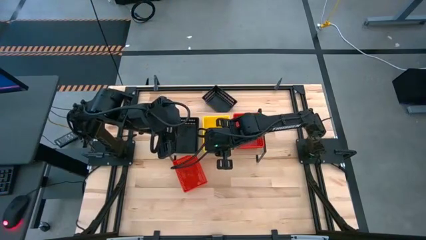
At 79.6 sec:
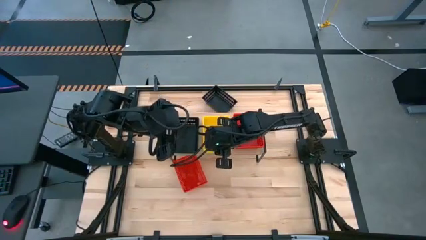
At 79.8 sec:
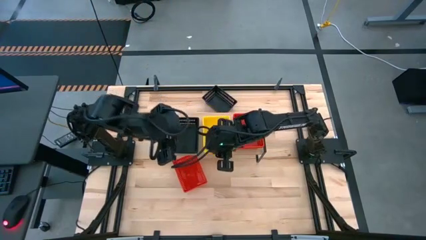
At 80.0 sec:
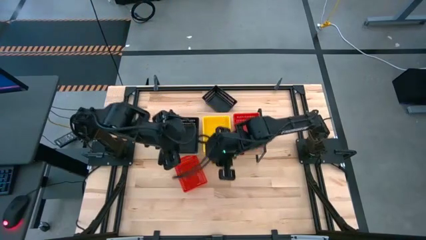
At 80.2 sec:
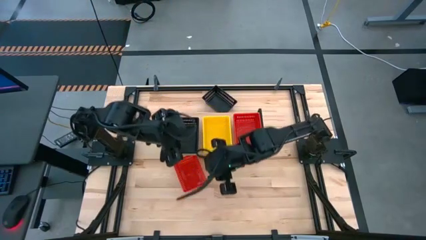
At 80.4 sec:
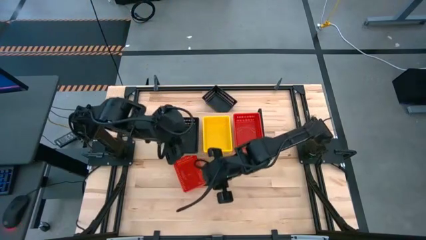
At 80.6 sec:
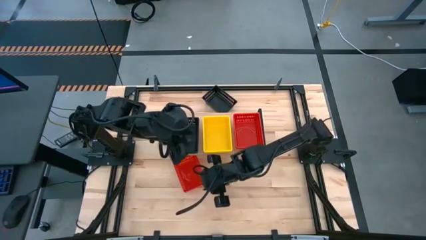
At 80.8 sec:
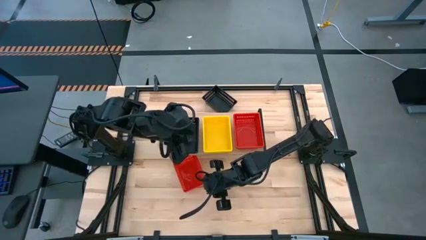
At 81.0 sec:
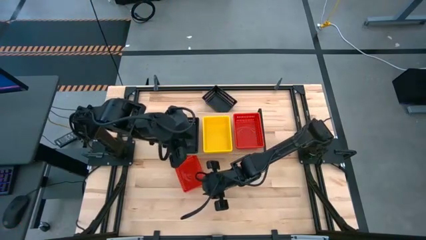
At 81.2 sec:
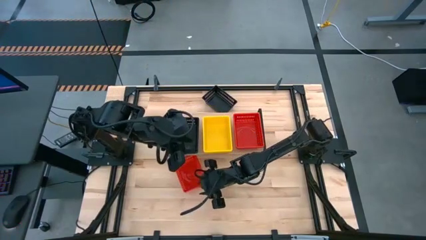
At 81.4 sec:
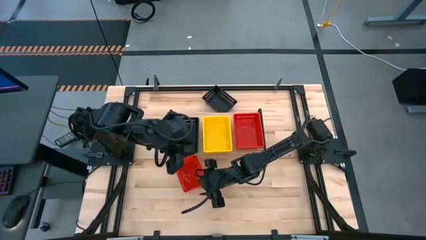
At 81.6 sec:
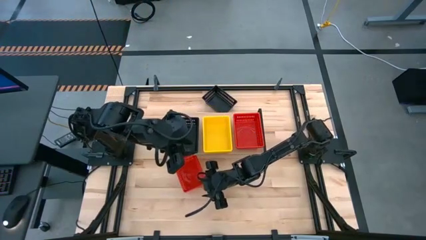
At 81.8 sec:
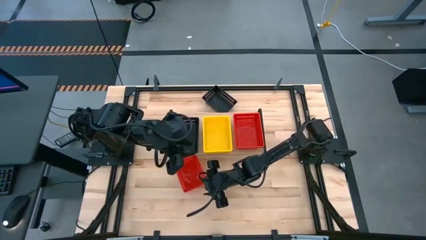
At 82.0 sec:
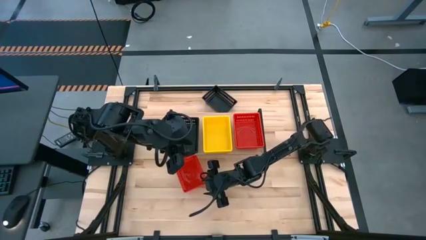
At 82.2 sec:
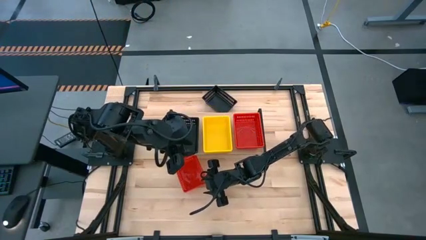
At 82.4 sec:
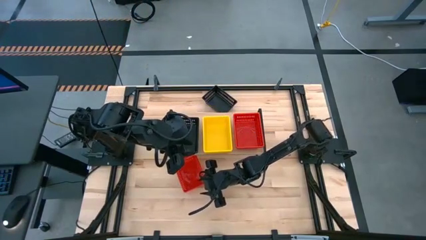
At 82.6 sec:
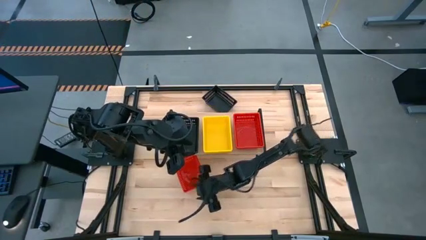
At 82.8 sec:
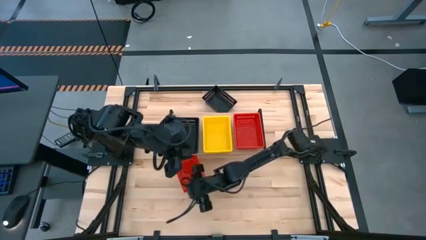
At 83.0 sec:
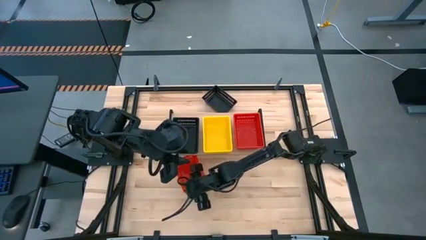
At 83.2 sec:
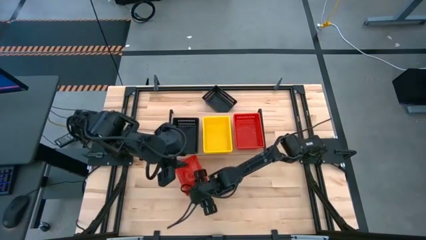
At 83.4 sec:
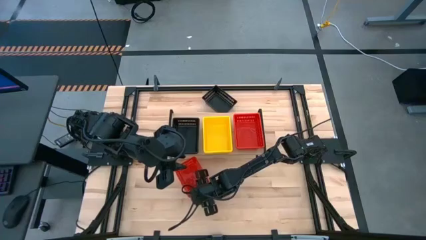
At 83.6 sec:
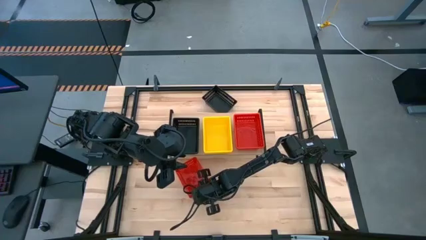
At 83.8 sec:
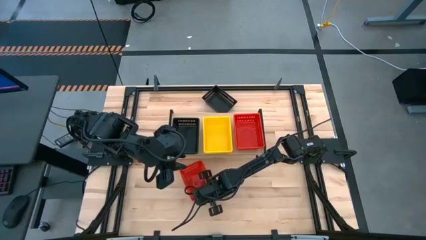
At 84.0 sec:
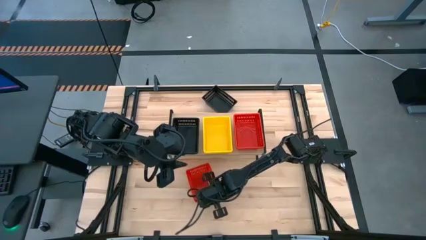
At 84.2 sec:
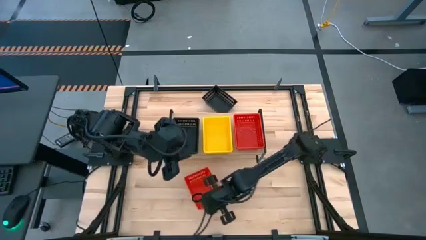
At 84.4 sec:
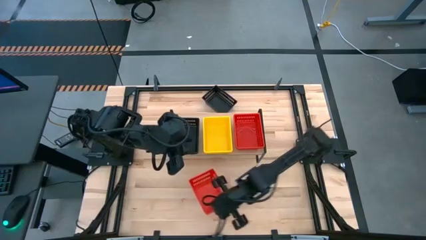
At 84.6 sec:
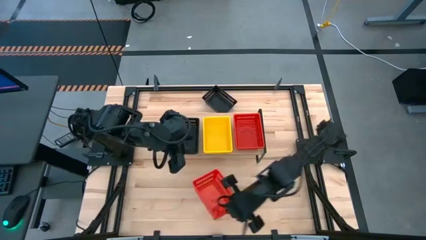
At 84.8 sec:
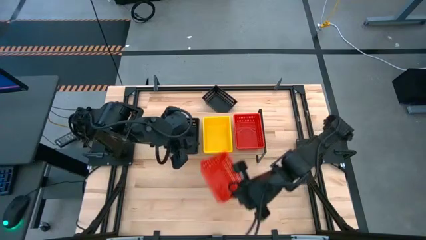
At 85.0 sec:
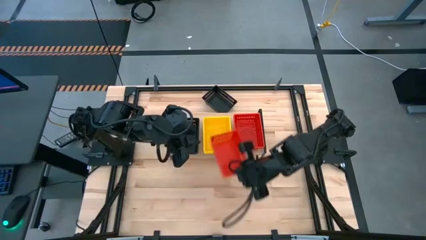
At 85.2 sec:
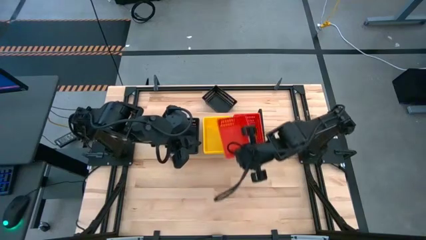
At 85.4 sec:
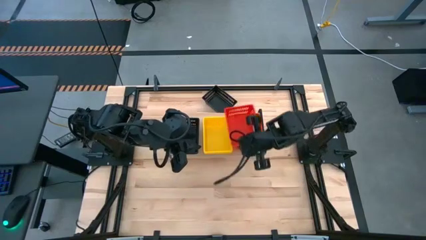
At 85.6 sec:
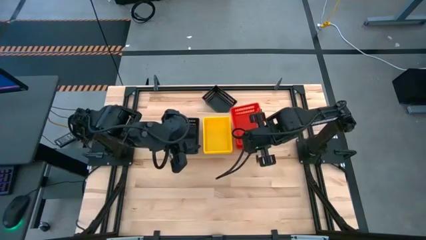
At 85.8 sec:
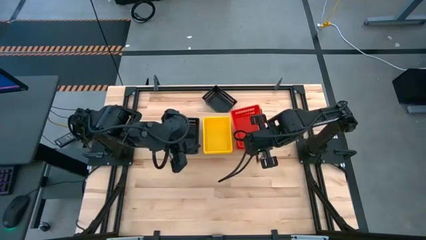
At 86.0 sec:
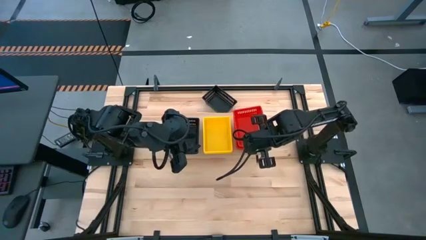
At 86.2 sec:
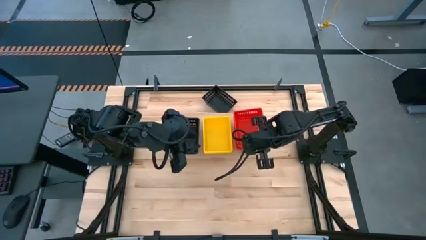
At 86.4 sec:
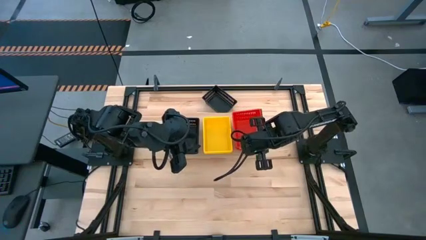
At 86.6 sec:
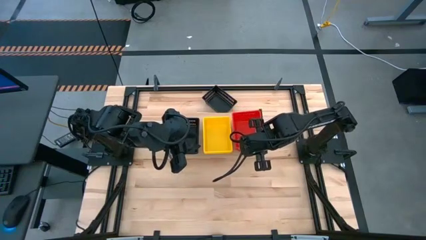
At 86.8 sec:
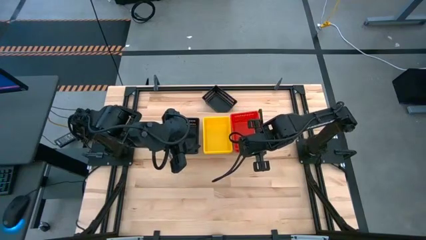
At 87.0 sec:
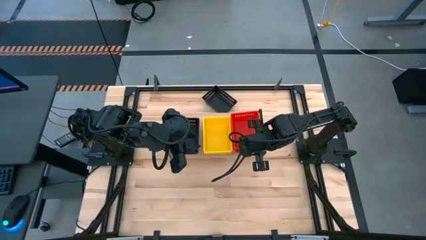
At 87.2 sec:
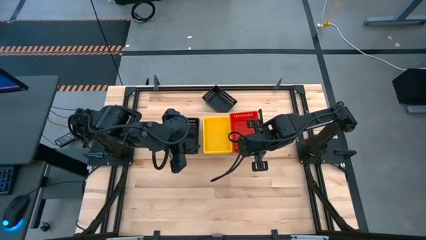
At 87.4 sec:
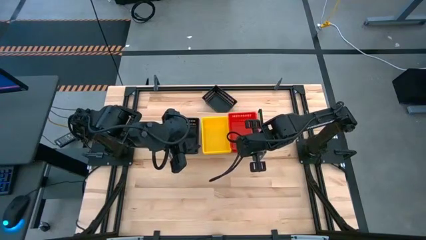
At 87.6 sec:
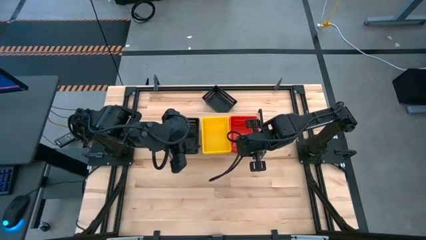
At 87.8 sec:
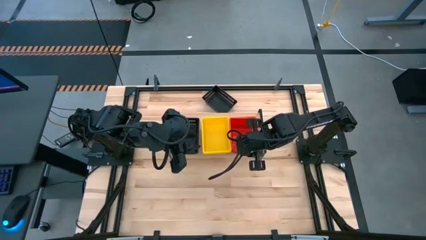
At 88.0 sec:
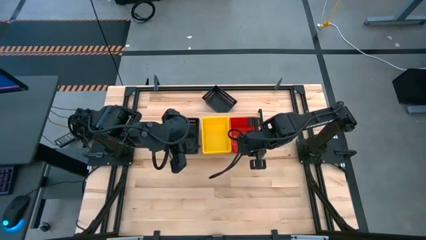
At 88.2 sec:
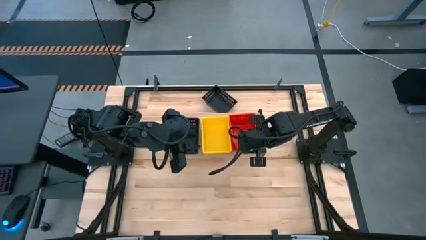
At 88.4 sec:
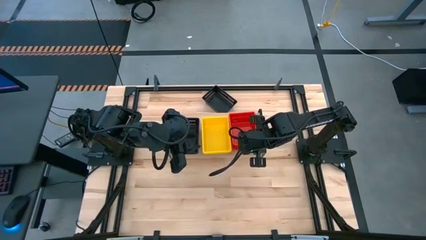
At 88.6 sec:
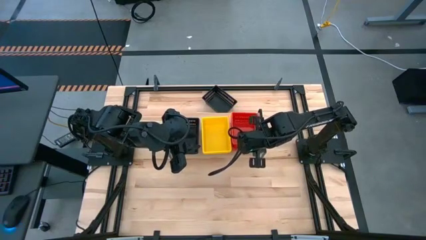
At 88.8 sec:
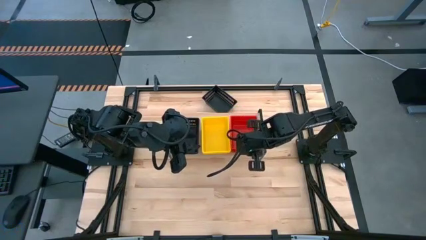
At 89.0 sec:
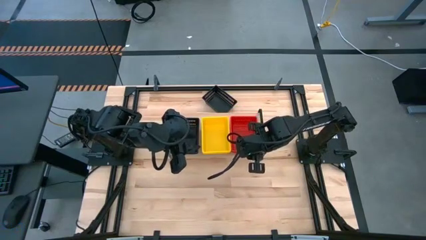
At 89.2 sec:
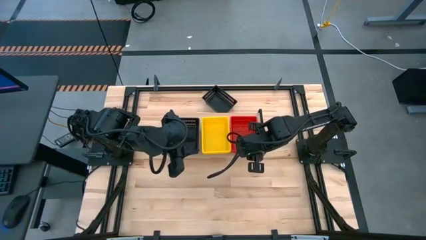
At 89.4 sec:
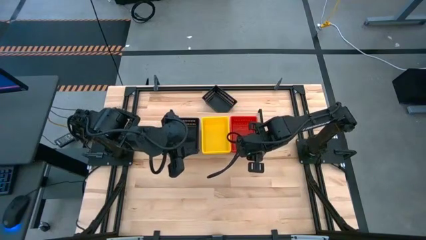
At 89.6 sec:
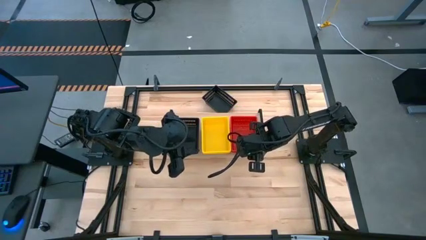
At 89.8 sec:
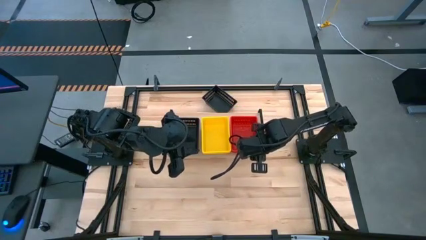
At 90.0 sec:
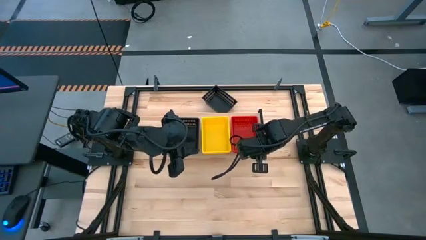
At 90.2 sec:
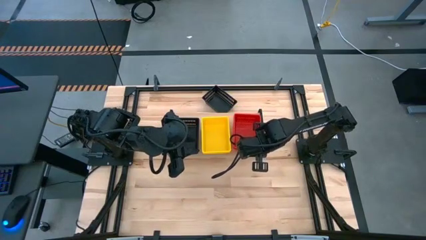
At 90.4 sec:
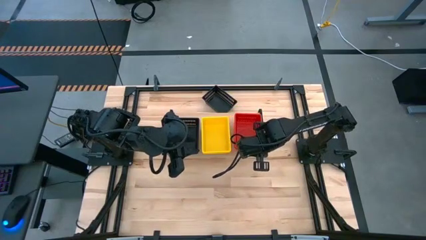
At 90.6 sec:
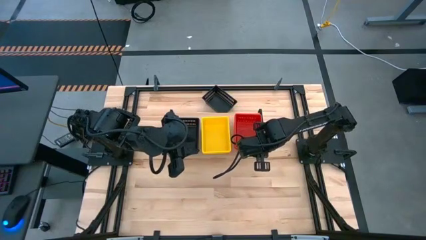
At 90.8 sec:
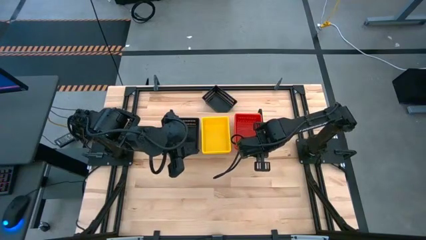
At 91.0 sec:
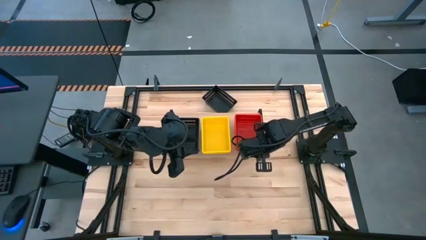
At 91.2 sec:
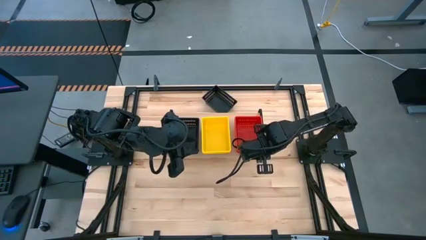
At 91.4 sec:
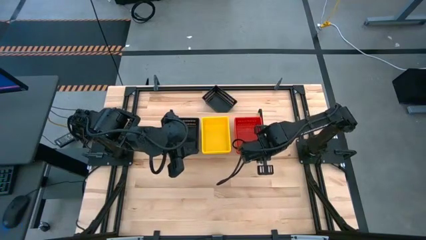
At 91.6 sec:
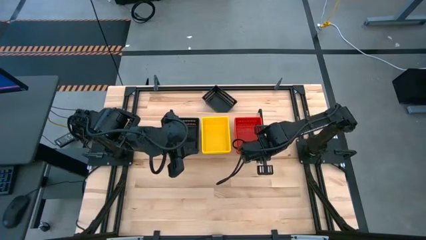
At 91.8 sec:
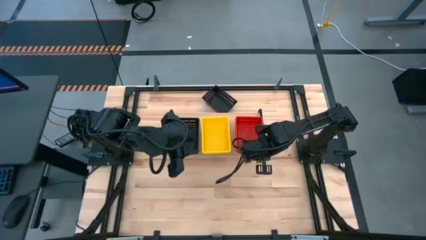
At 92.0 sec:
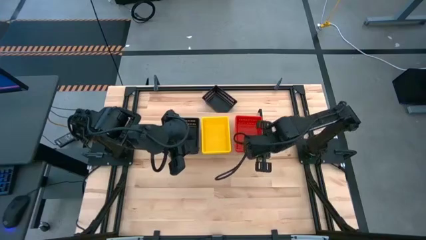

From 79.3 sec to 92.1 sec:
Task: Stack baskets on shelf by color
Stack the red basket on the stacked red baskets on the shelf

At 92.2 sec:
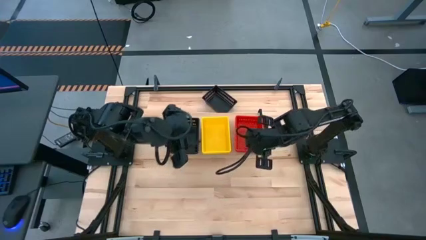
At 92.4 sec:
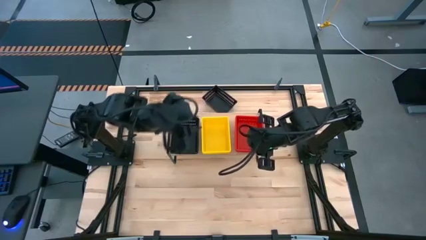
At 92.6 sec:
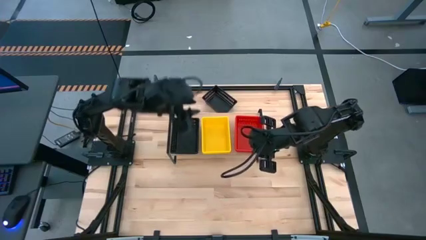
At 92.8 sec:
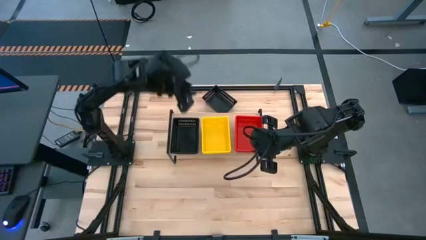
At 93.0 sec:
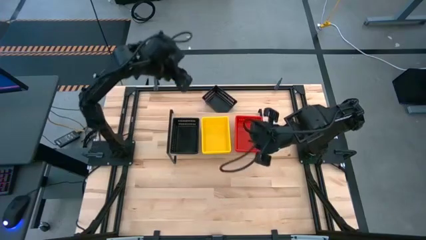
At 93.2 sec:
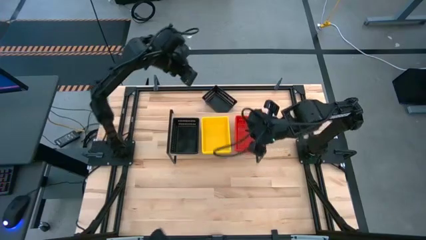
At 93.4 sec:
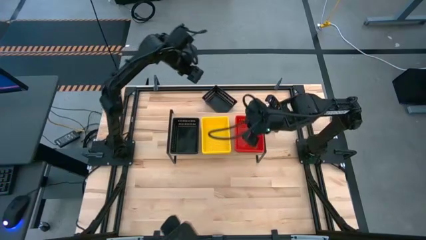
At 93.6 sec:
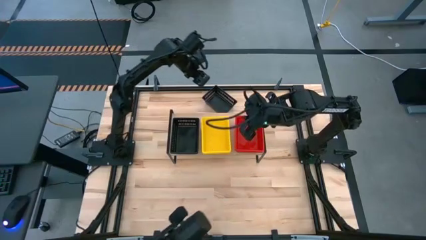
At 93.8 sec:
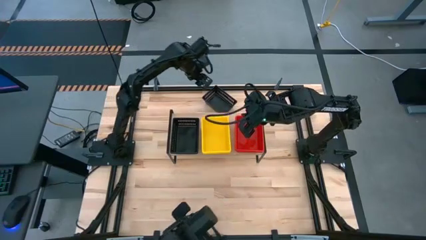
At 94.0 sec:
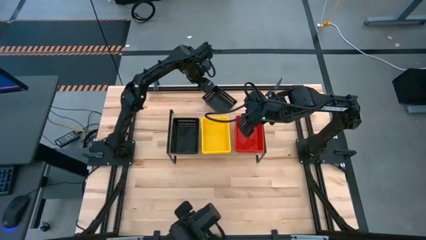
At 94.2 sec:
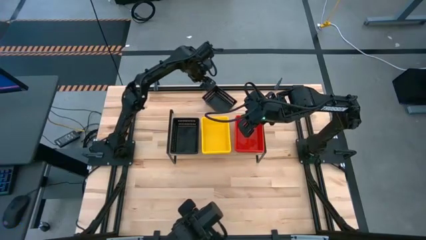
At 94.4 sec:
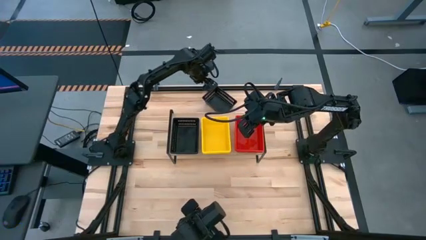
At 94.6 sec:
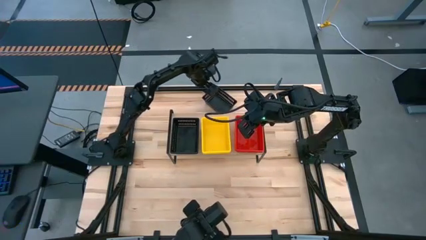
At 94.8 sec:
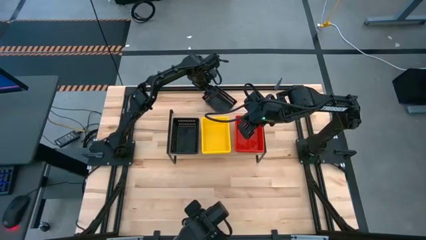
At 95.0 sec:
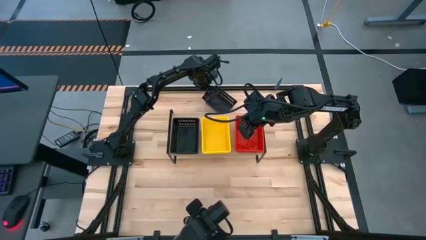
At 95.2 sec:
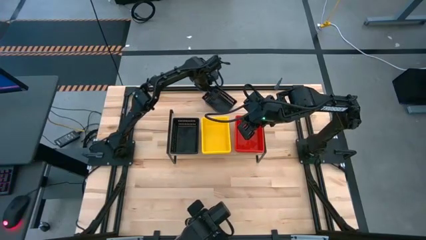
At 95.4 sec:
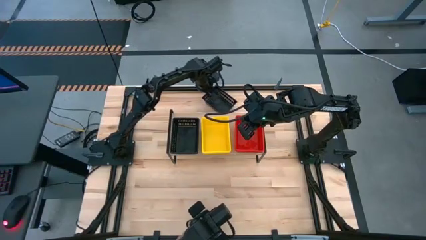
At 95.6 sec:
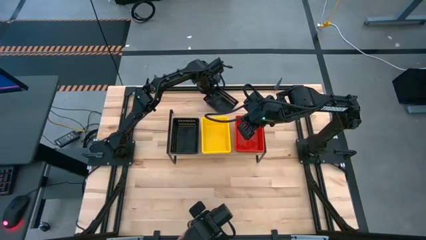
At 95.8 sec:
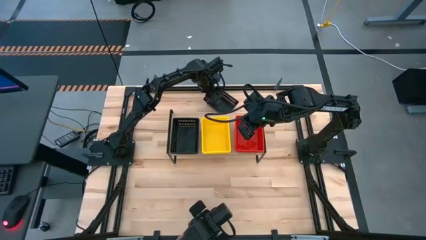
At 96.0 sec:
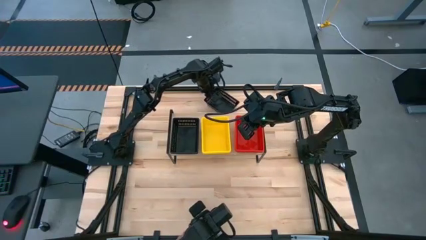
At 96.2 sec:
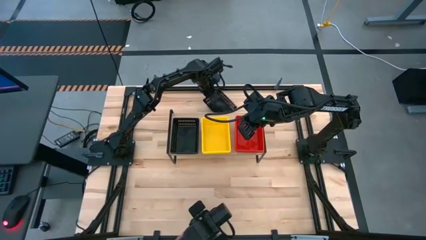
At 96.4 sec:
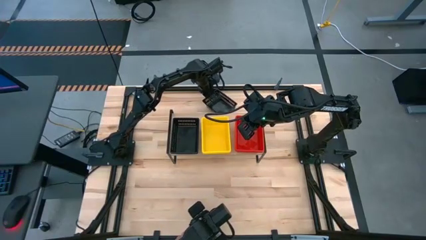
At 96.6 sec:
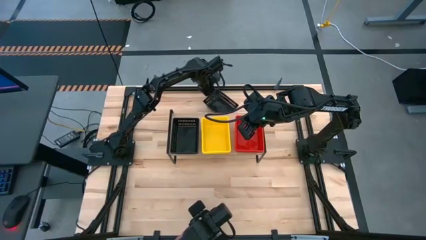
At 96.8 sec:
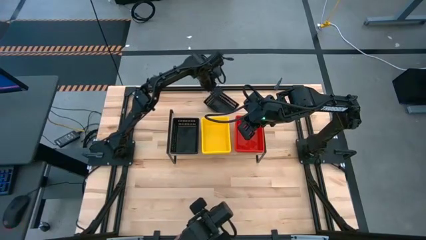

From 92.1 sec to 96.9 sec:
Stack the black basket on the stacked black baskets on the shelf
